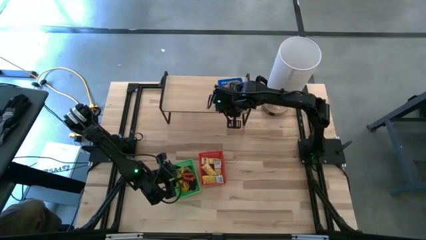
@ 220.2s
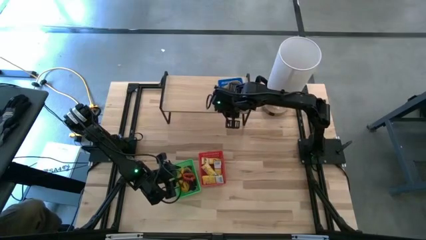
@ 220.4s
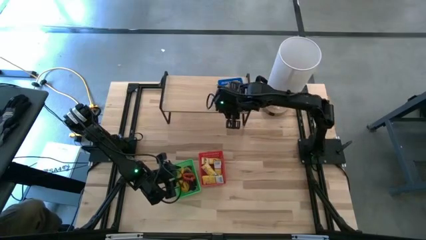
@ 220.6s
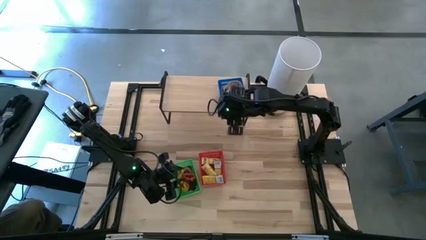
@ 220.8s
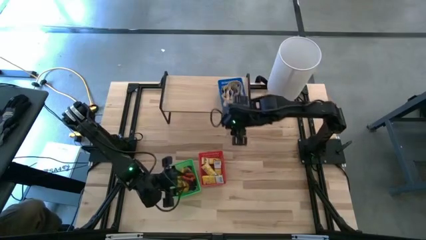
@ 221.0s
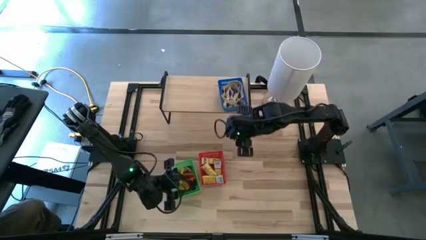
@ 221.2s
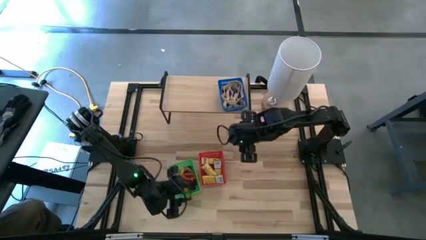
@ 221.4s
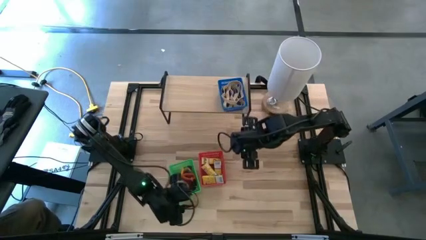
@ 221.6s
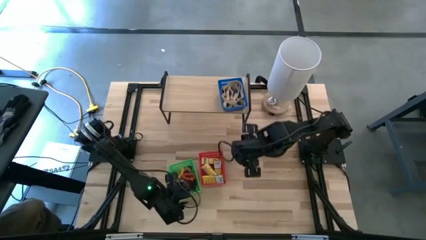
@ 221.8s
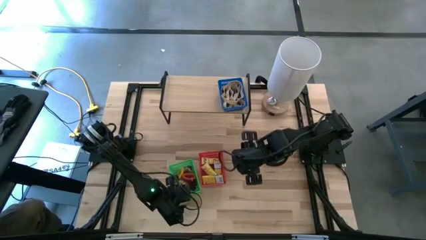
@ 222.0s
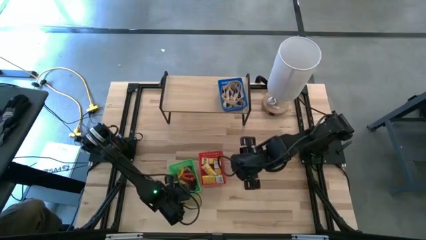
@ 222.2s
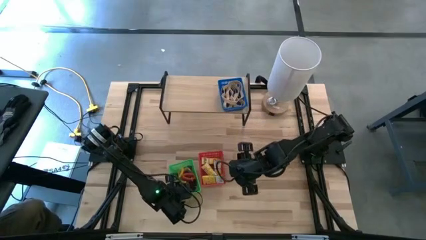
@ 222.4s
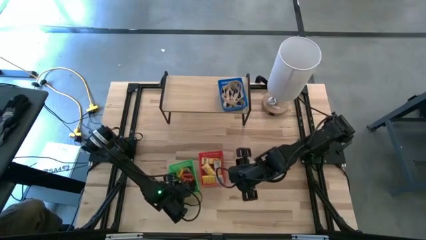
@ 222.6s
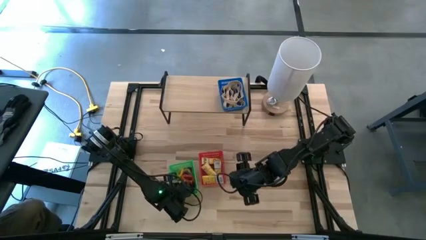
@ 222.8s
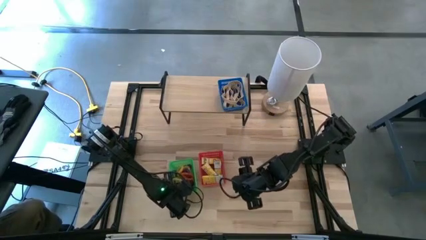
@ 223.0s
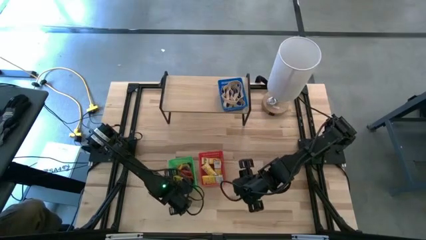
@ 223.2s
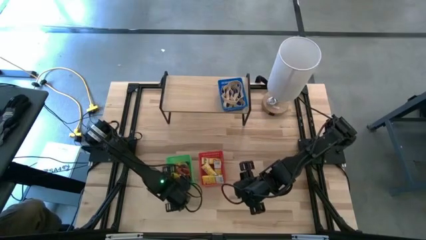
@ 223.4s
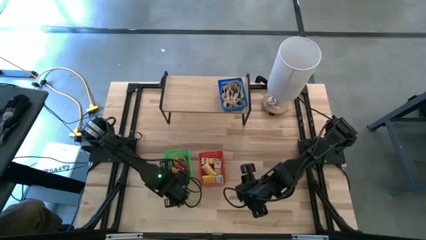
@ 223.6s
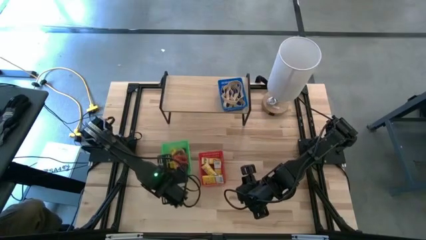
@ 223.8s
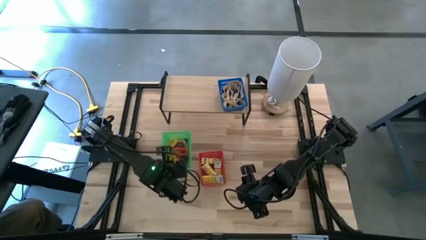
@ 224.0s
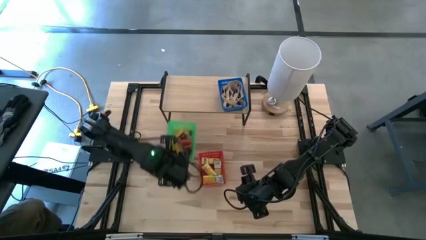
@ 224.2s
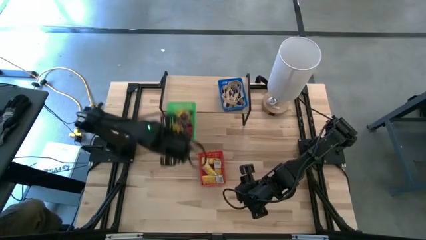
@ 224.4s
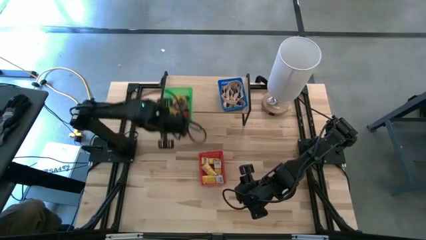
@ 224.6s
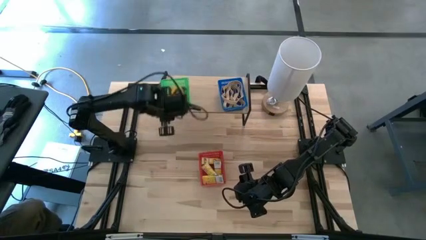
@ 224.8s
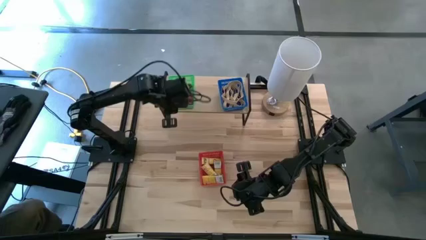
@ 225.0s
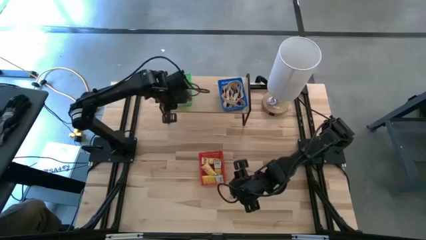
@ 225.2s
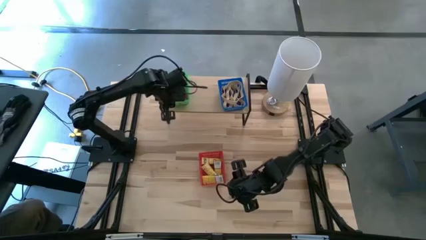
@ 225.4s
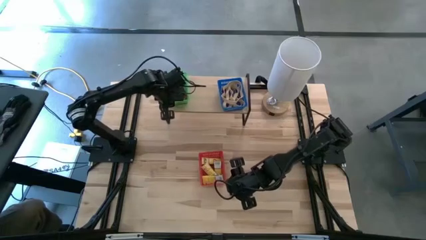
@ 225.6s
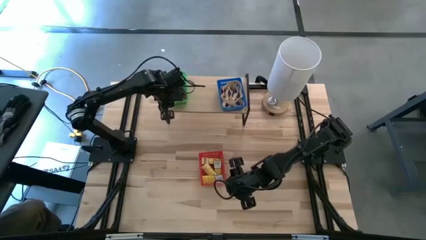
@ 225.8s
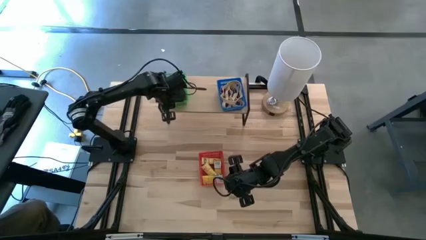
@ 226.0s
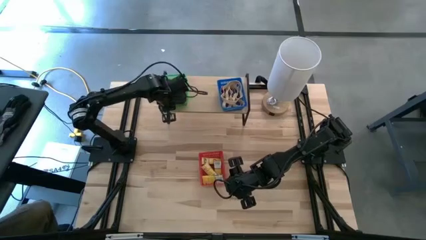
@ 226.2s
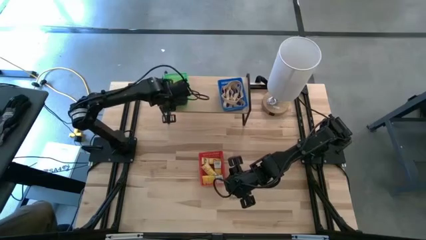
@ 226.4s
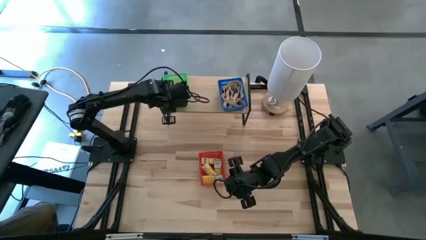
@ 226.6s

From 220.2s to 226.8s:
Task: Pick & Place Office Desk Supplies
Put the green bin on the shelf

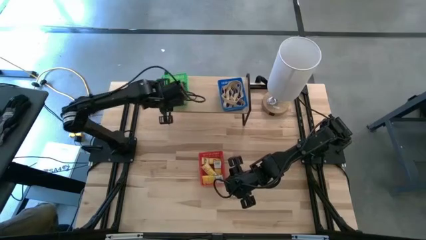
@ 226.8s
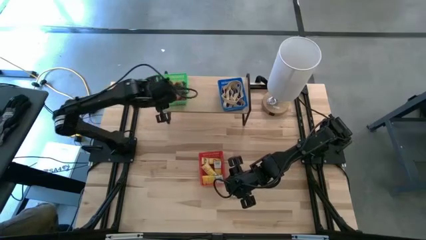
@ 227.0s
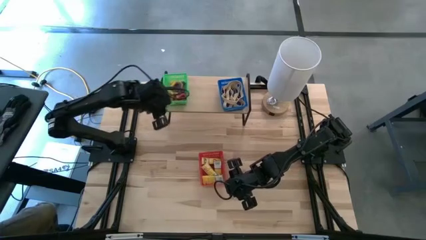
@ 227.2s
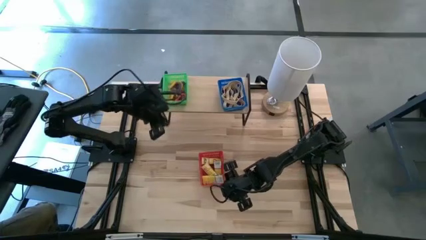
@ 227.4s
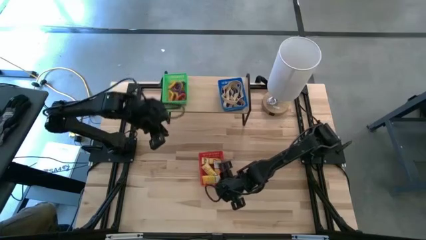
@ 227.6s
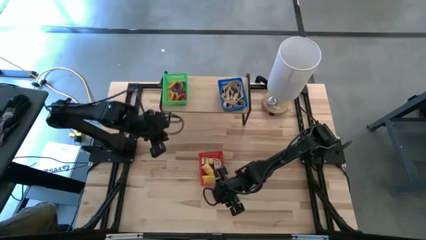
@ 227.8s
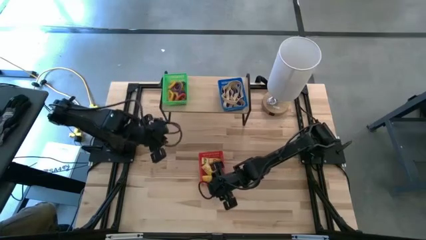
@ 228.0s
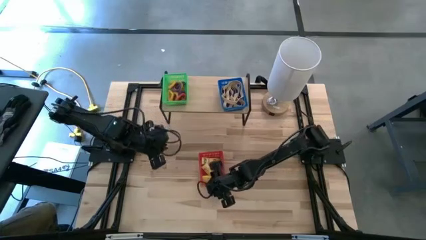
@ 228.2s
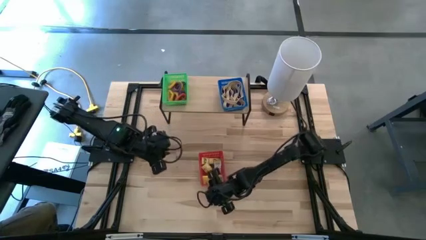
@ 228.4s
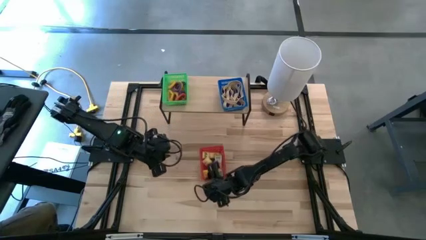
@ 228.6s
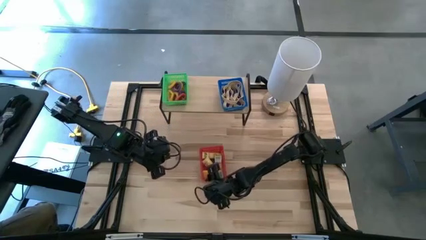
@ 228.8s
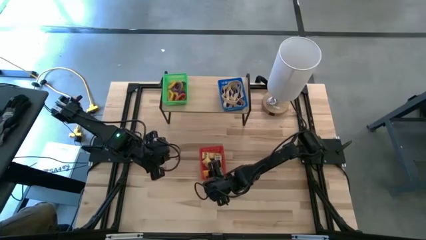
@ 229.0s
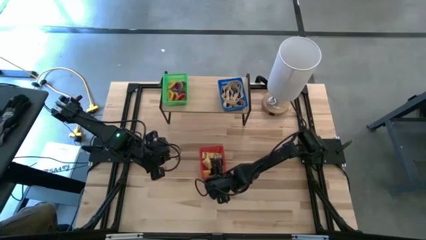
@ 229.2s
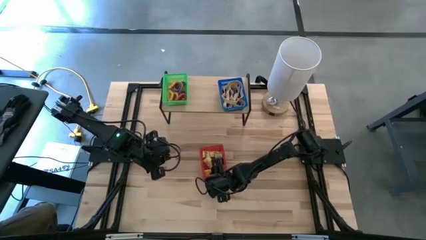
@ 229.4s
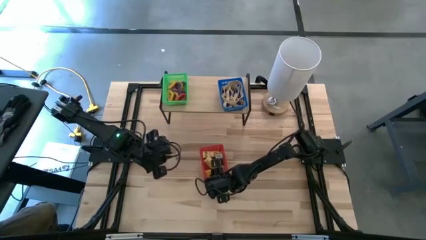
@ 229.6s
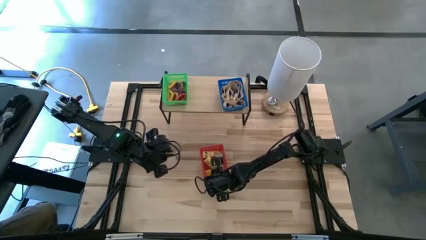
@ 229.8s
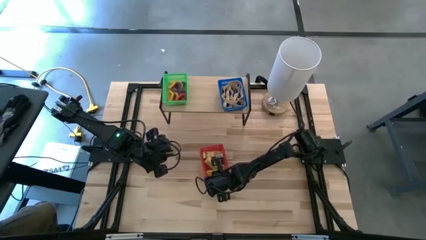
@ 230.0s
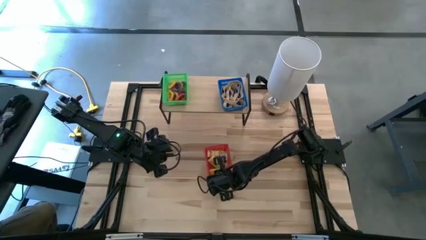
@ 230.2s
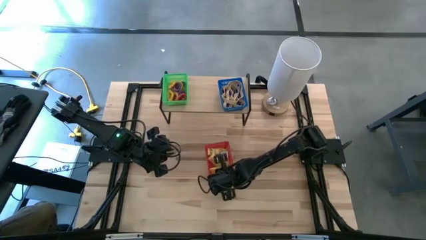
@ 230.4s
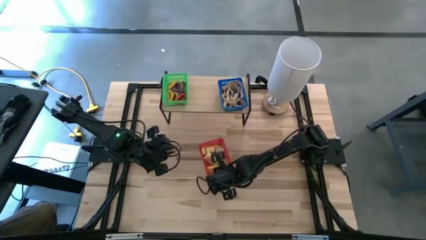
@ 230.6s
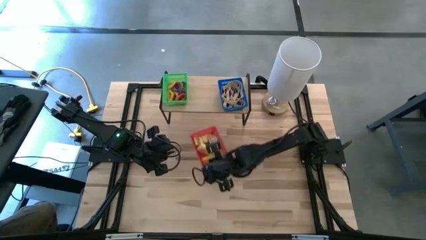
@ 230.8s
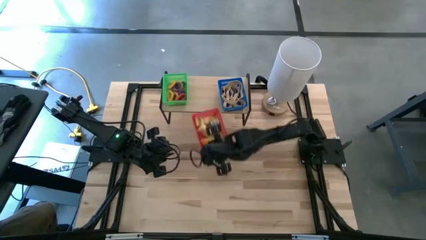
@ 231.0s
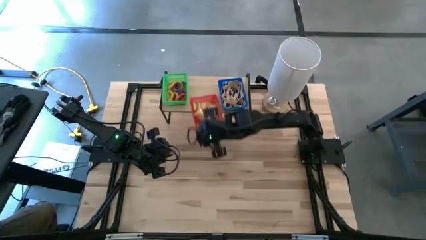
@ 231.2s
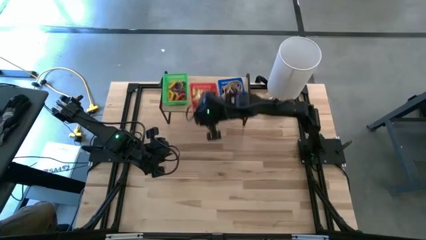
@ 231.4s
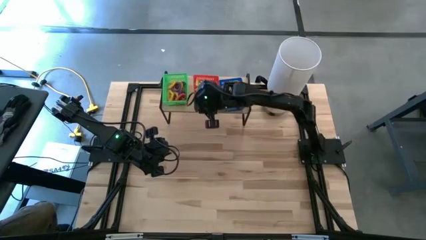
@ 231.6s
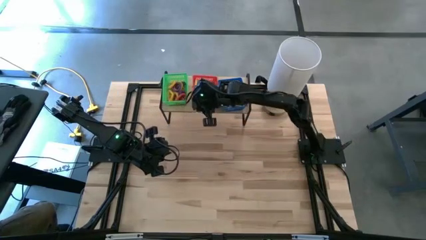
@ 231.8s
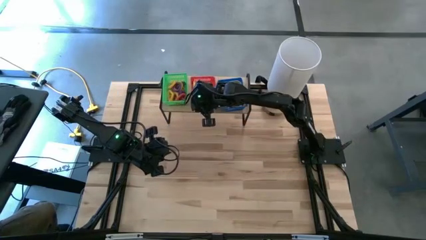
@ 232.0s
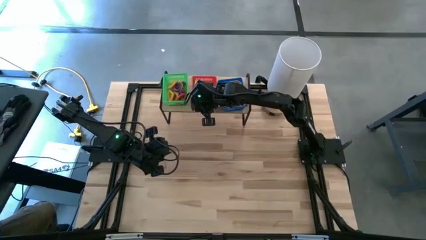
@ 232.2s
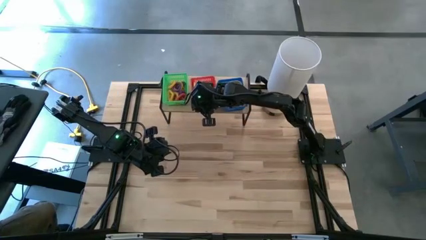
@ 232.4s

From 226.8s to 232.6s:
Put the red bin on the shelf

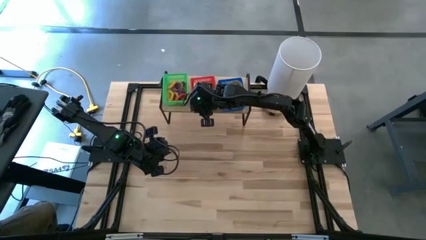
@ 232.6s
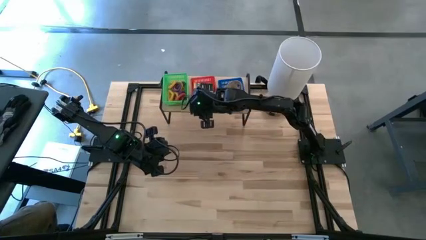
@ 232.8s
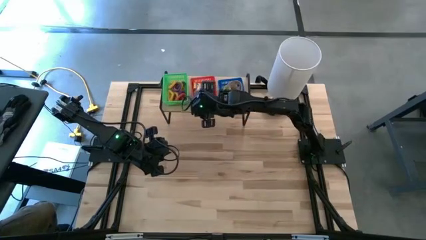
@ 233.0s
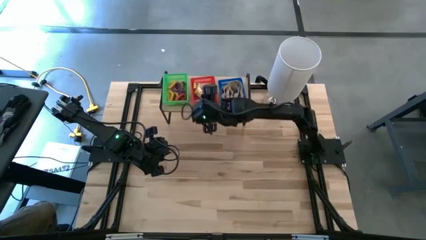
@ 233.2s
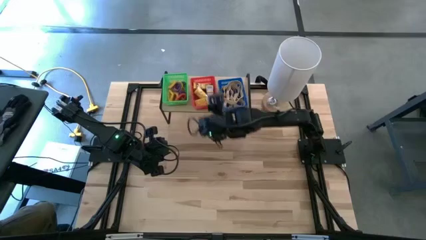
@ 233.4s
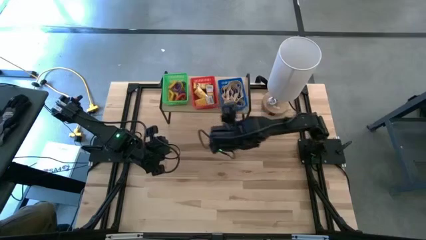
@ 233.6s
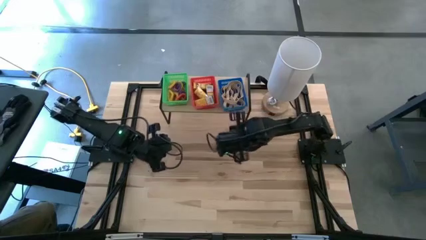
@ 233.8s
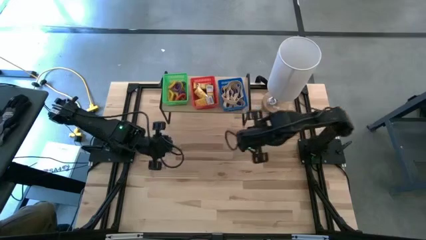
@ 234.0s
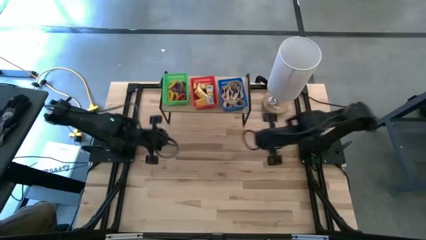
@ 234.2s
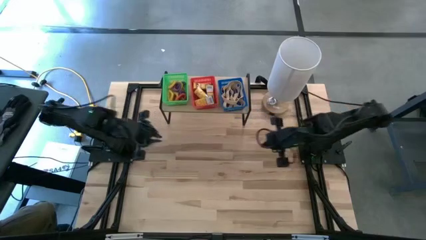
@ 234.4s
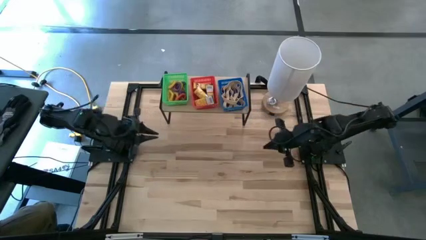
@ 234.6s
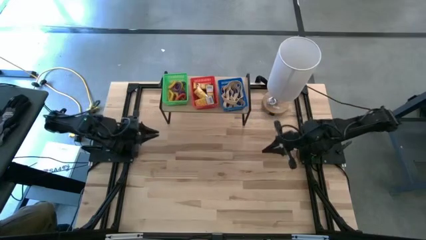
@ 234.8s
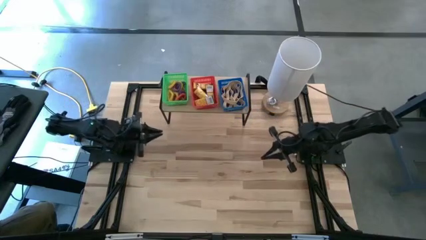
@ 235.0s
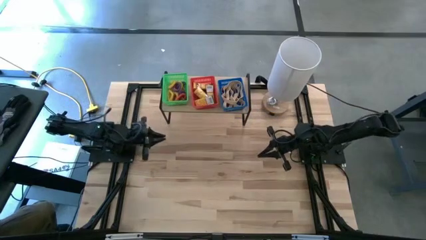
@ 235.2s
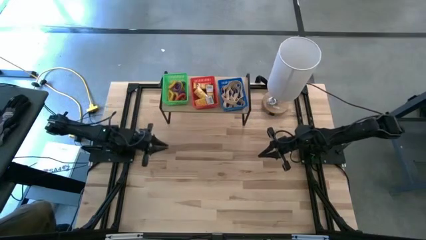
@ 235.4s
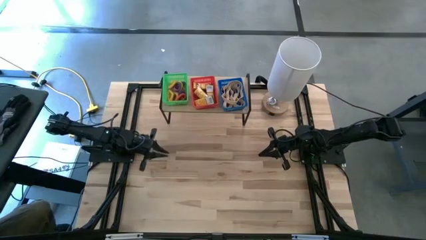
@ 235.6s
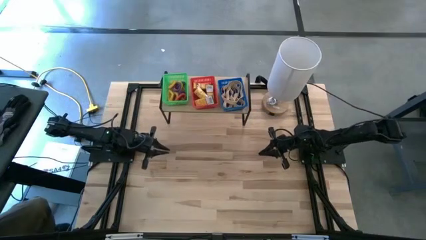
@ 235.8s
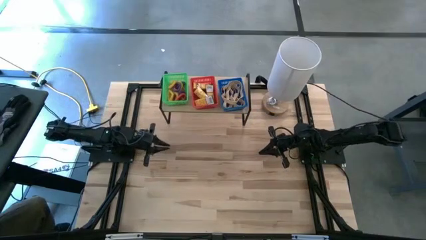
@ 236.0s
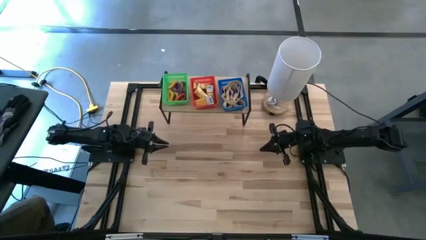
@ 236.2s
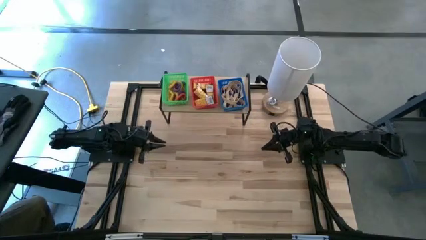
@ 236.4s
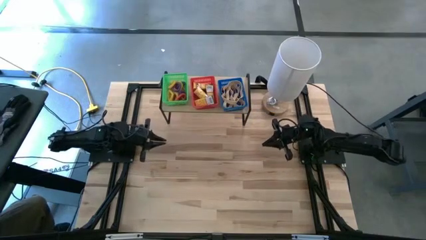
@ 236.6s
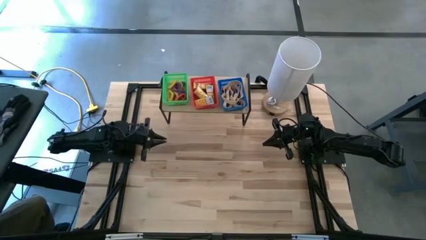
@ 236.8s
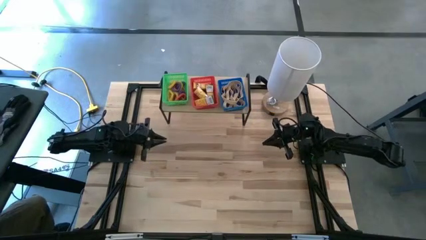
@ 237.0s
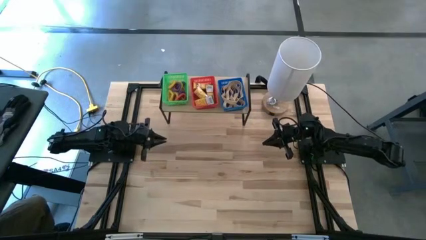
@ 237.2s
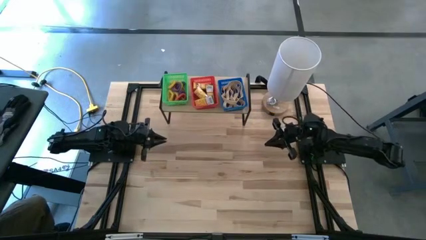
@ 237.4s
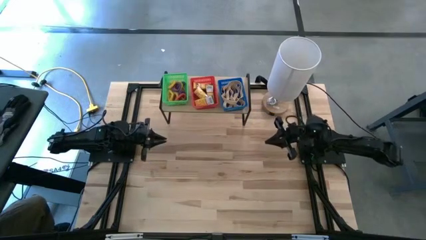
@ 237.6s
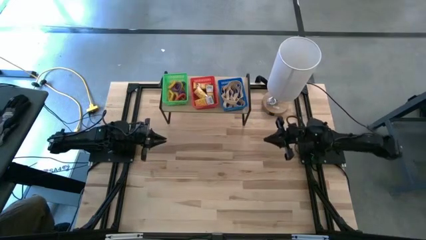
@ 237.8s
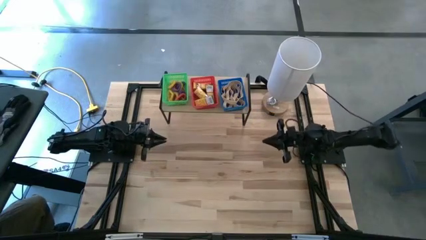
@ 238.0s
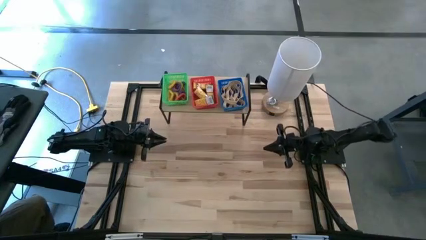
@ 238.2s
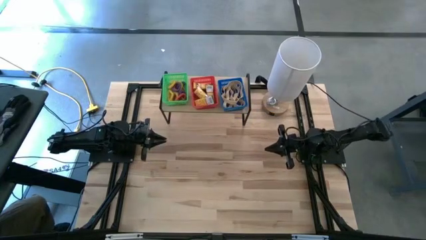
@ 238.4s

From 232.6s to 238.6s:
Return to Home Position
